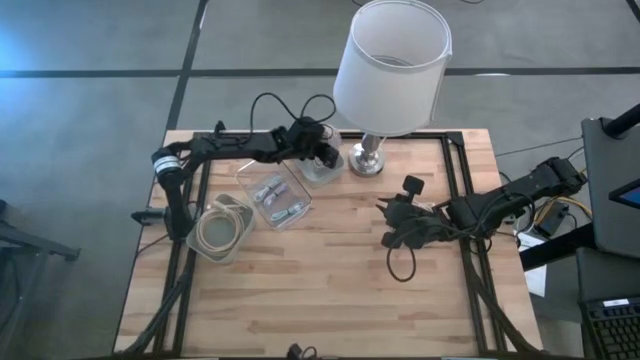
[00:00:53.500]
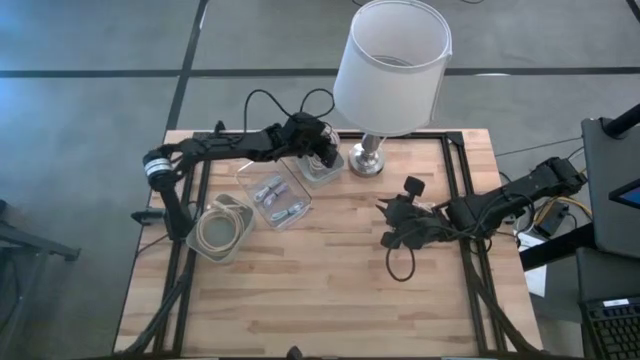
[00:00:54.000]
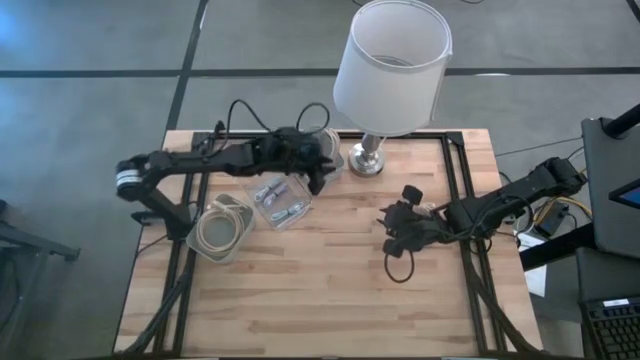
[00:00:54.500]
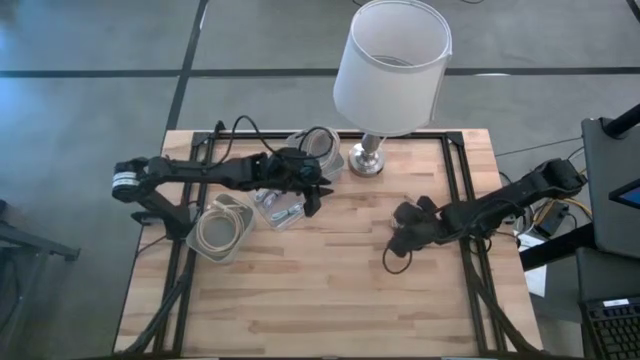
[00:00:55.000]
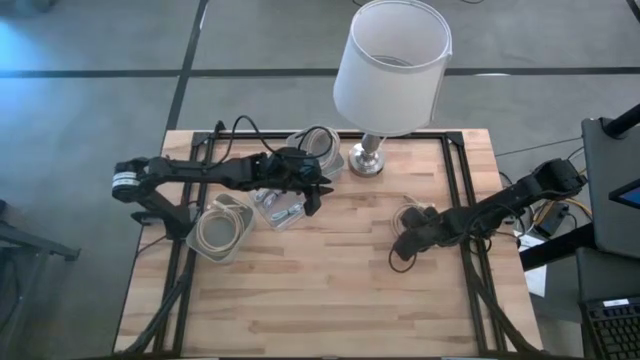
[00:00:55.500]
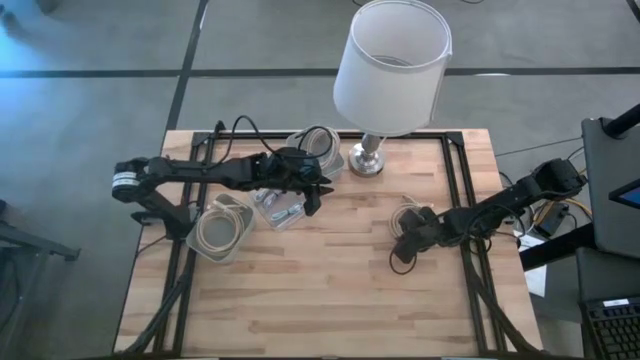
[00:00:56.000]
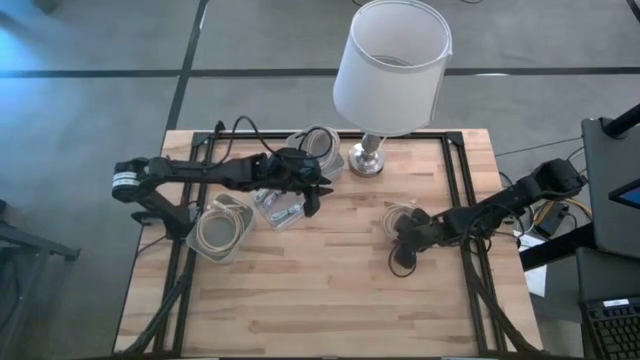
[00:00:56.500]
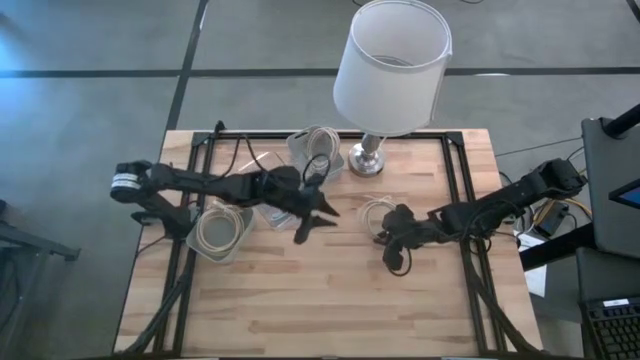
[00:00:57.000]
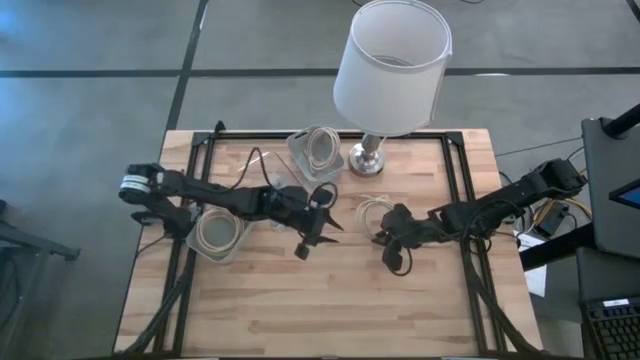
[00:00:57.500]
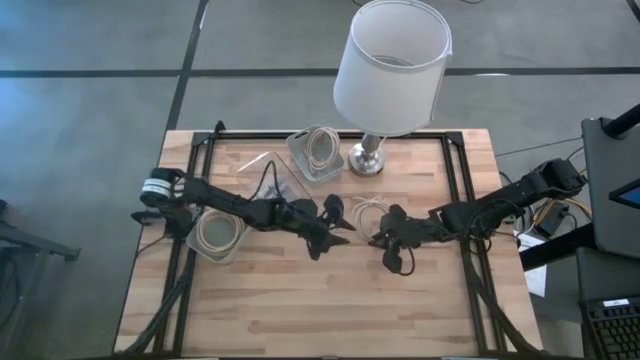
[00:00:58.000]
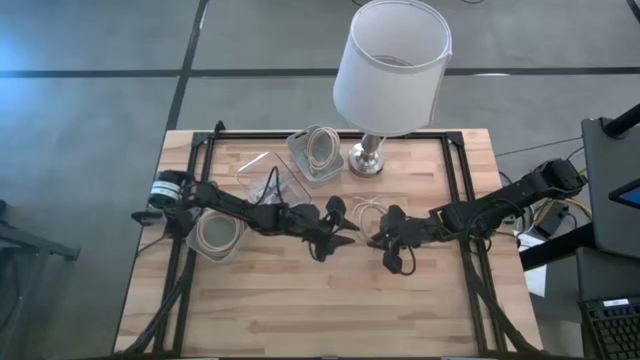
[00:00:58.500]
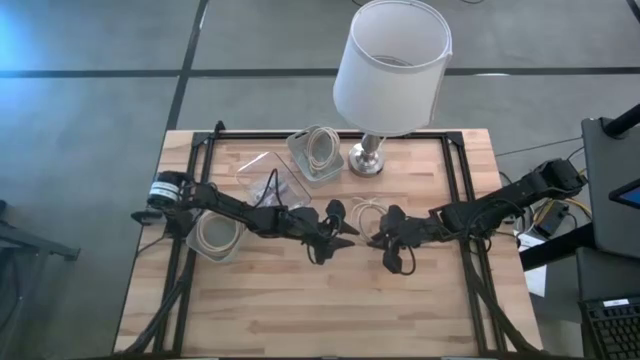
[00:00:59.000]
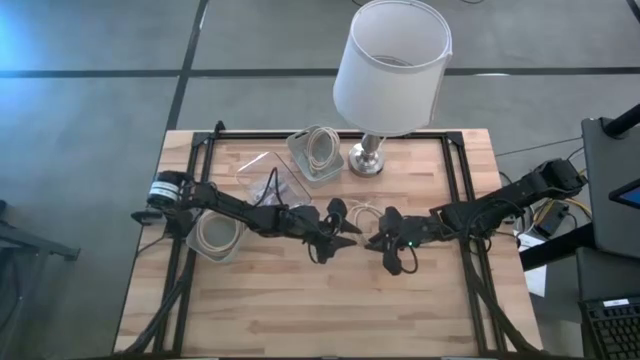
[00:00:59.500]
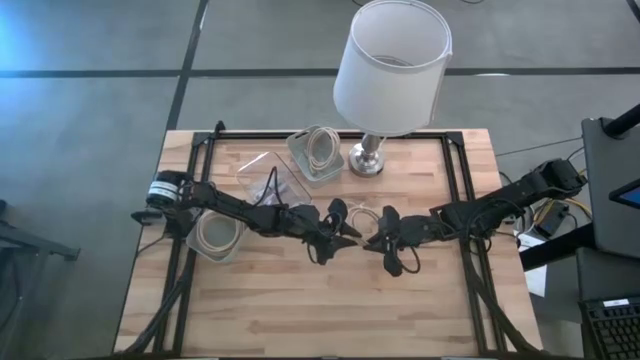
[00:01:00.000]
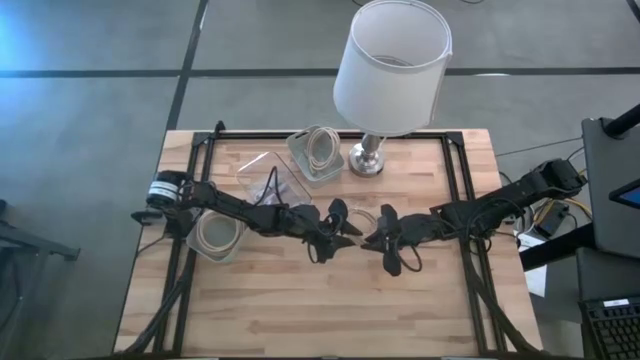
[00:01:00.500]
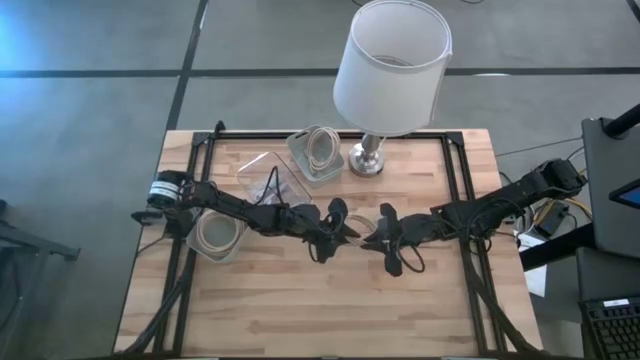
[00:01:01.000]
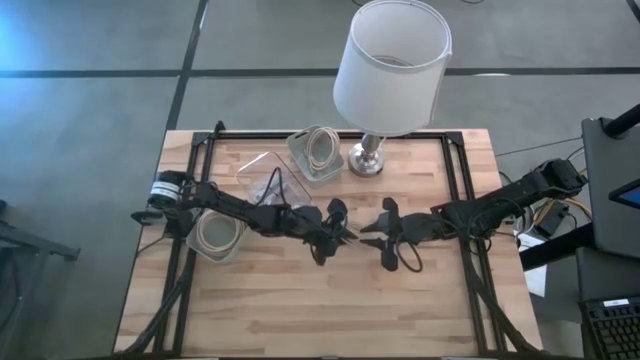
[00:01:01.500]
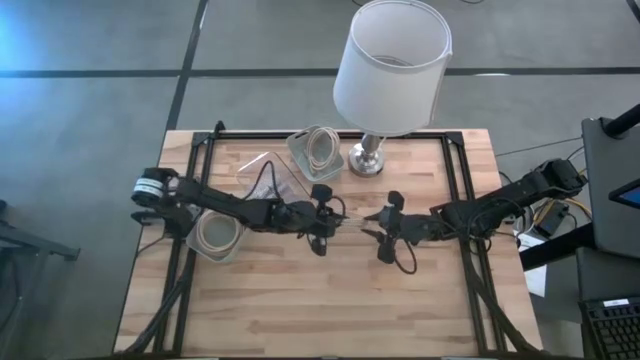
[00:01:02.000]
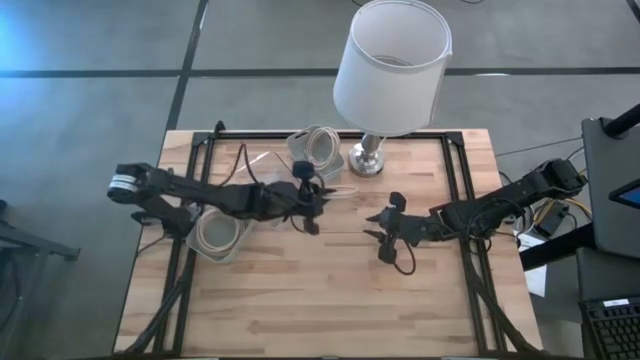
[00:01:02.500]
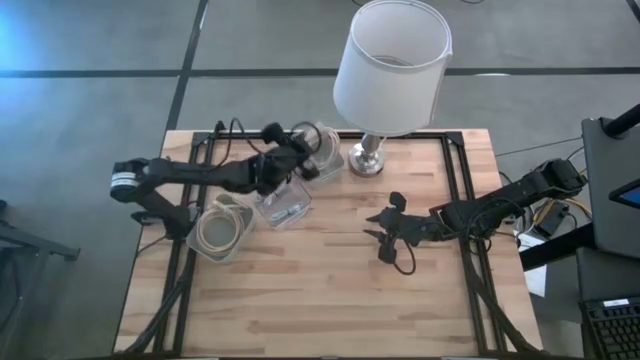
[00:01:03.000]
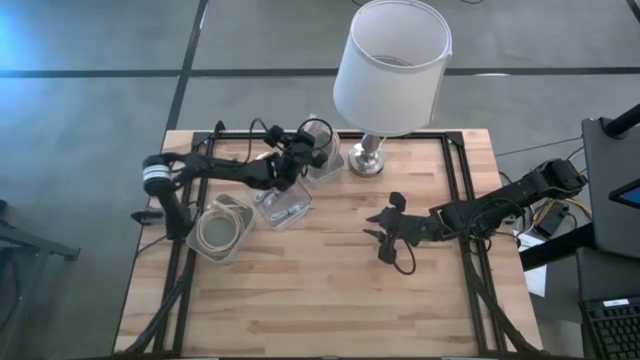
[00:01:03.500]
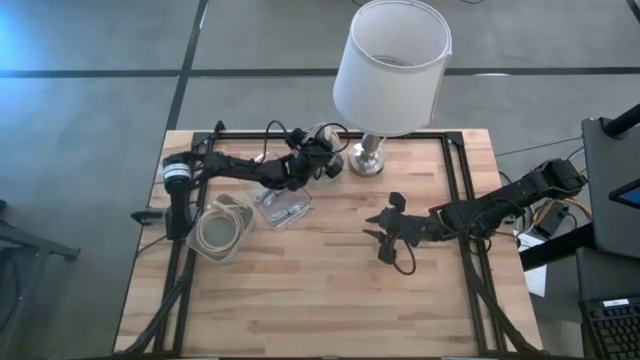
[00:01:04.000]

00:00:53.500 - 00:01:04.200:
Task: Pick & Place USB Port
Put the brown hdmi cable into the right gray bin

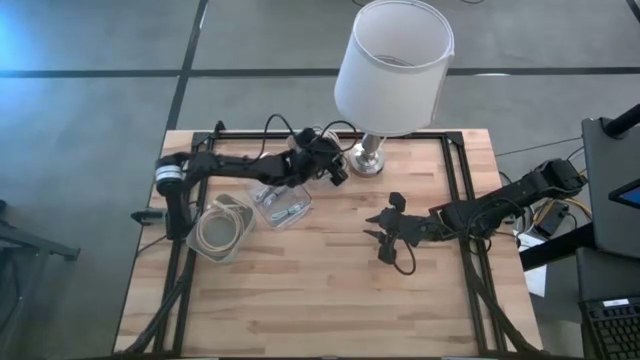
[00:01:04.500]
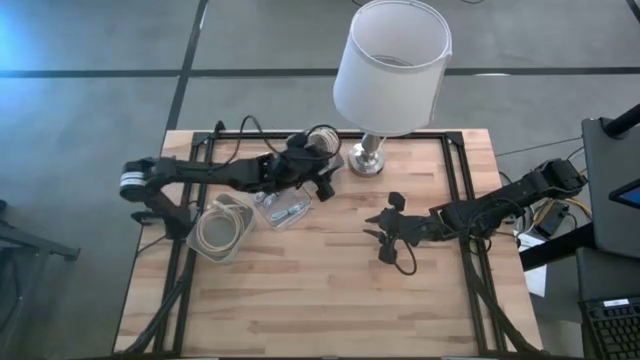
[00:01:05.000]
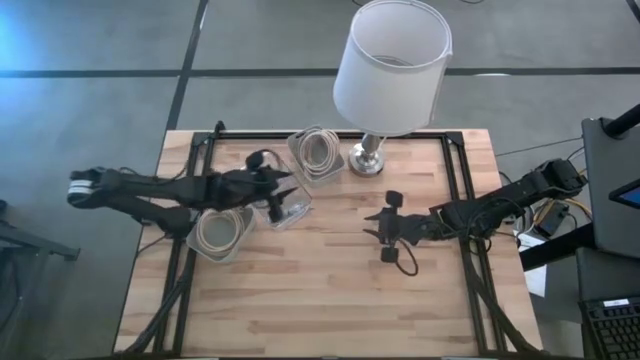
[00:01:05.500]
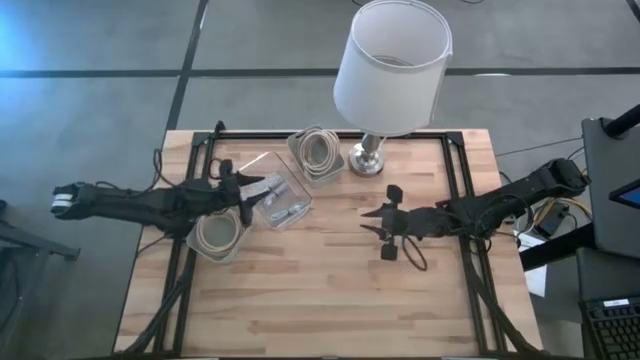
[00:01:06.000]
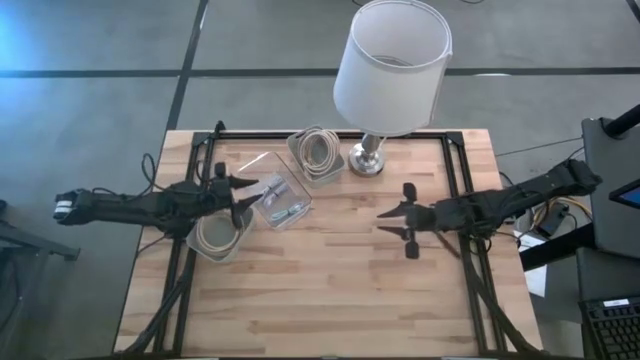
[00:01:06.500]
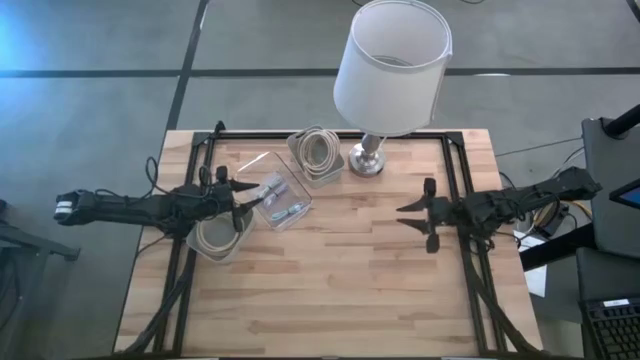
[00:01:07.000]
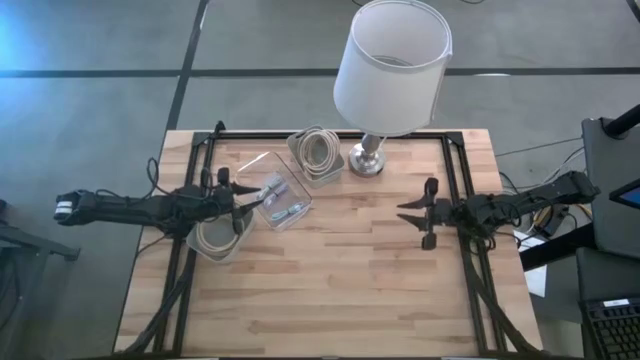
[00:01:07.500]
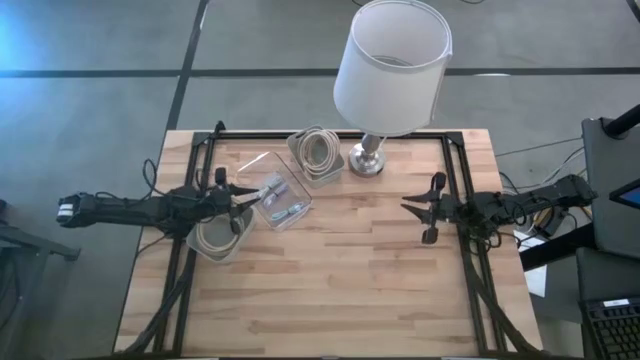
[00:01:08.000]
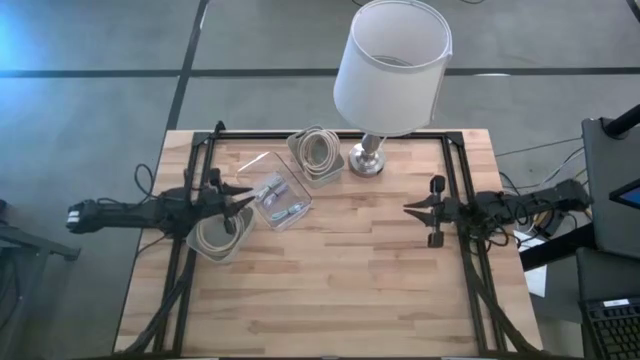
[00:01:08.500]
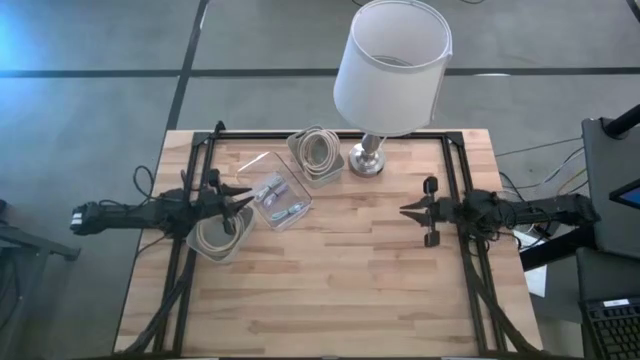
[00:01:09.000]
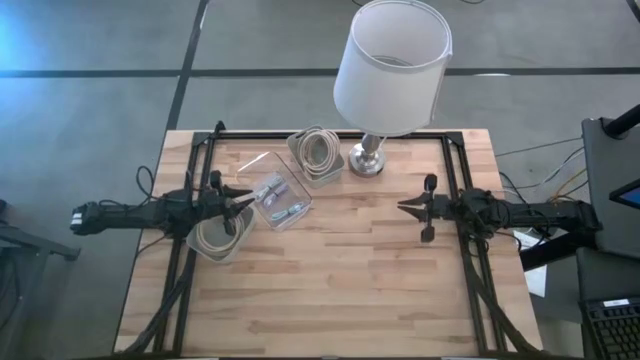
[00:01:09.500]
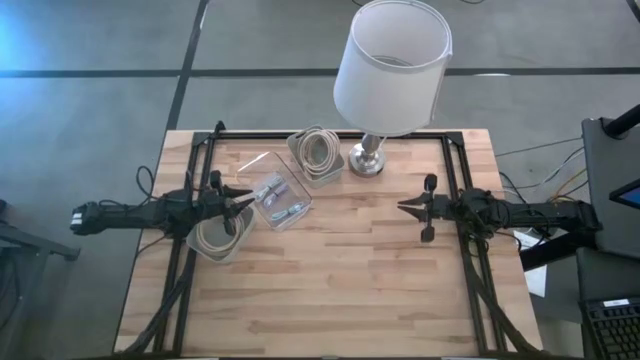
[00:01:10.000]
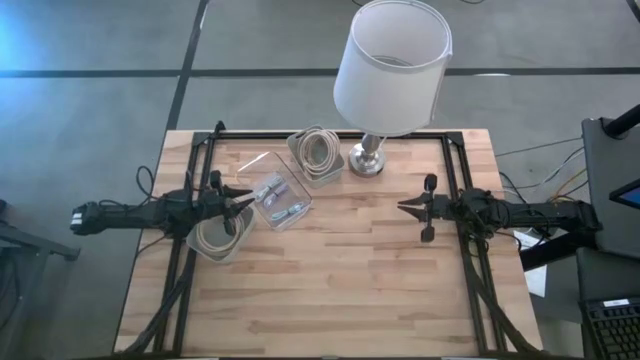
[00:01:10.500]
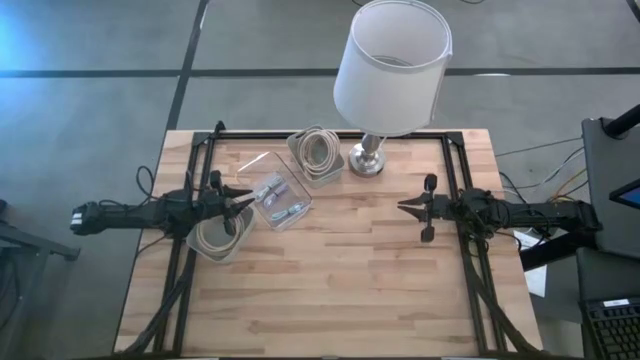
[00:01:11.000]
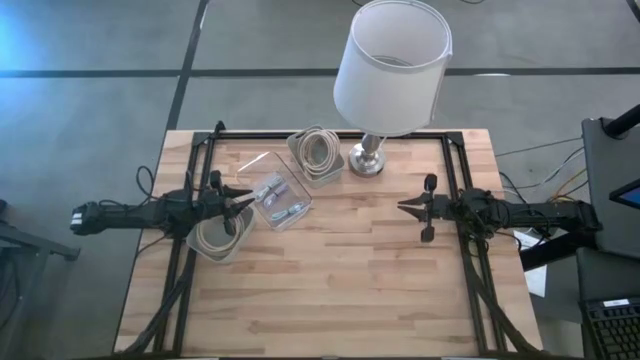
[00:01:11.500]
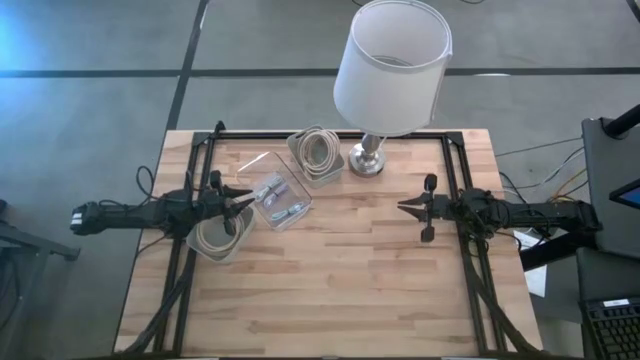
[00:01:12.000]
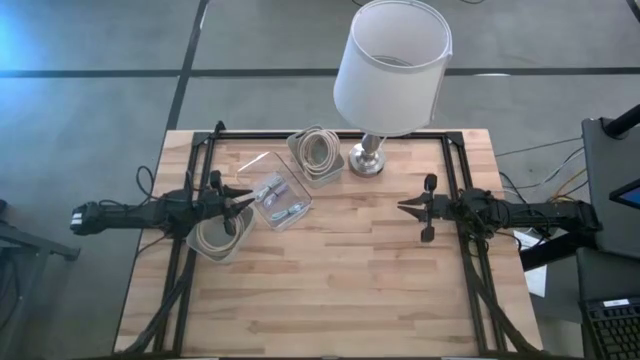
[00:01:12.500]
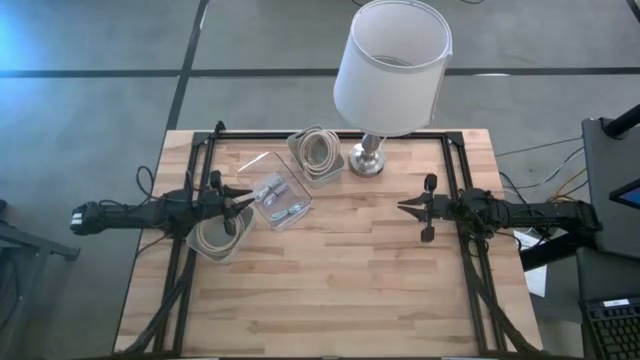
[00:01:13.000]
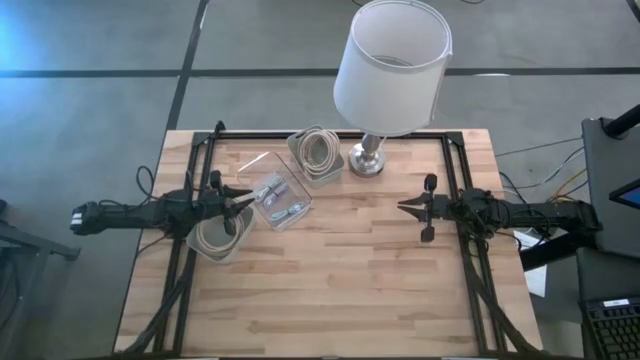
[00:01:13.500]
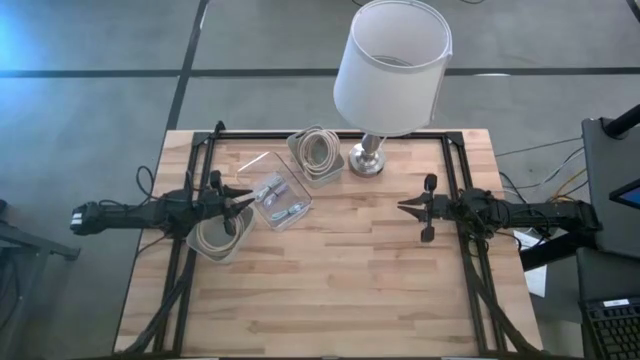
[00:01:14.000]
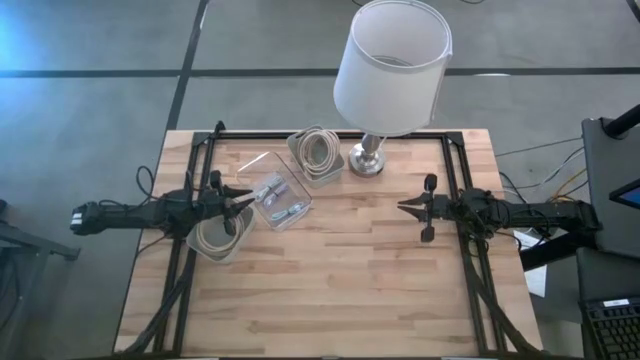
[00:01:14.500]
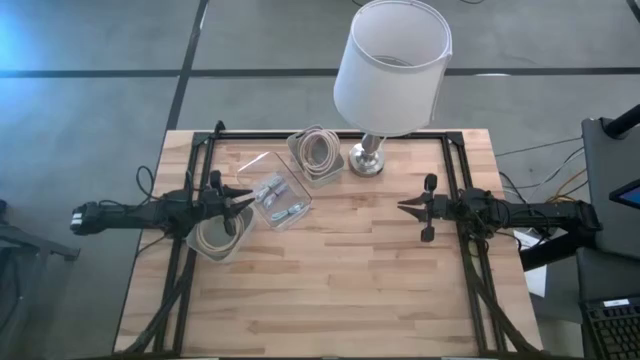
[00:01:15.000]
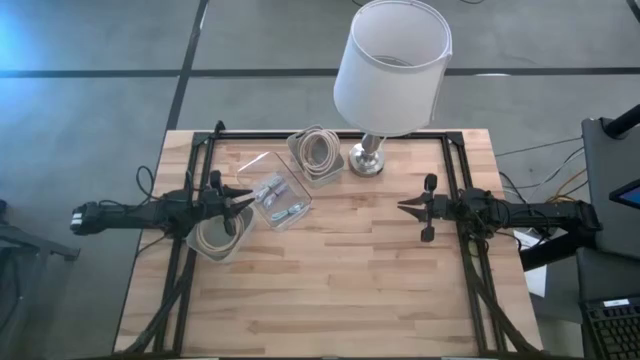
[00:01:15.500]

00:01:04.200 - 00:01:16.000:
Return to Home Position
